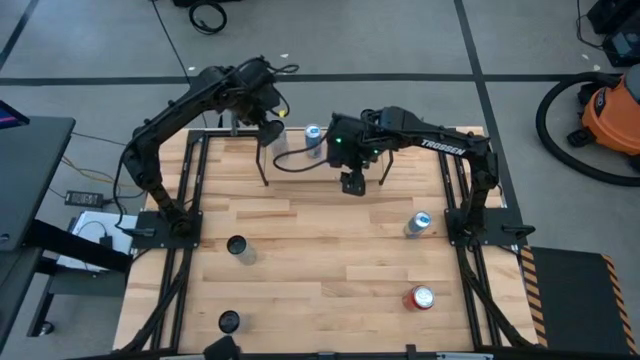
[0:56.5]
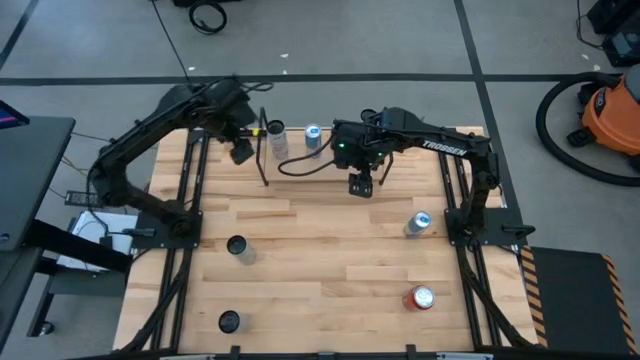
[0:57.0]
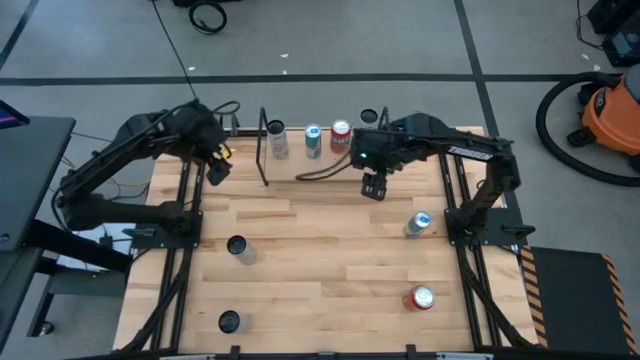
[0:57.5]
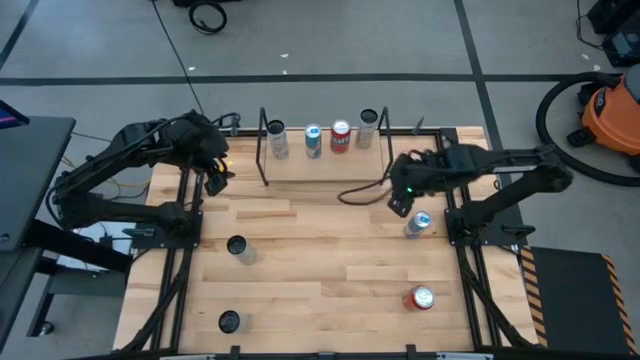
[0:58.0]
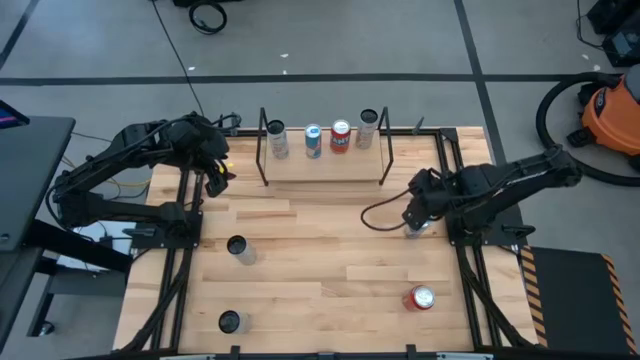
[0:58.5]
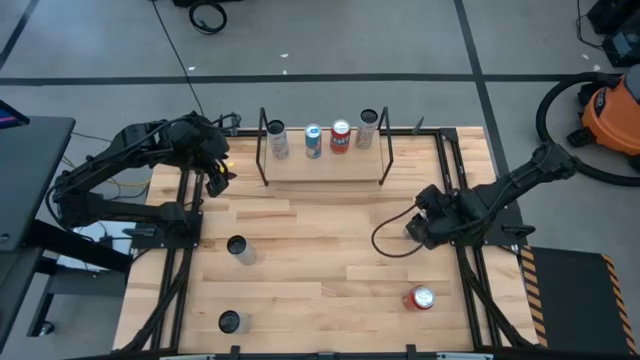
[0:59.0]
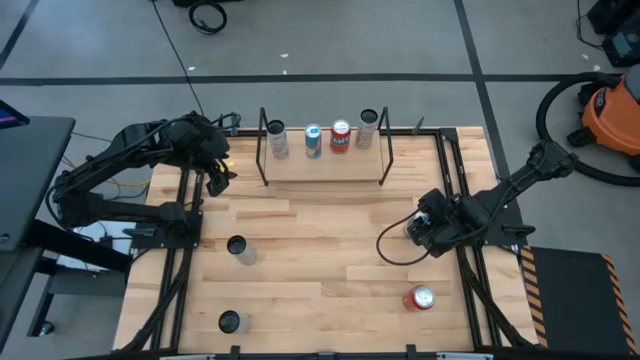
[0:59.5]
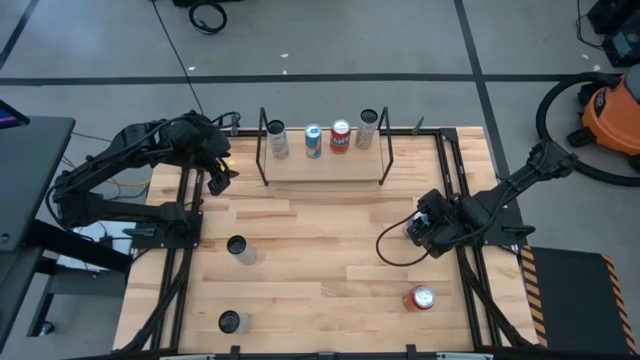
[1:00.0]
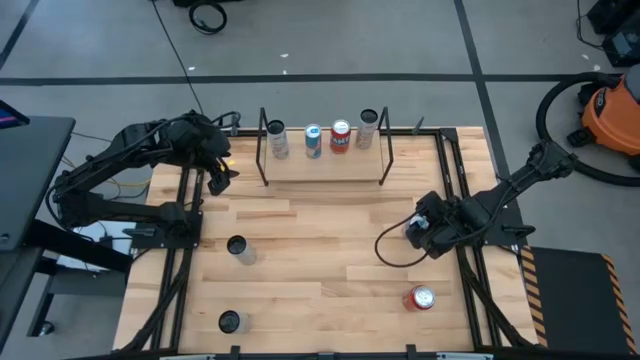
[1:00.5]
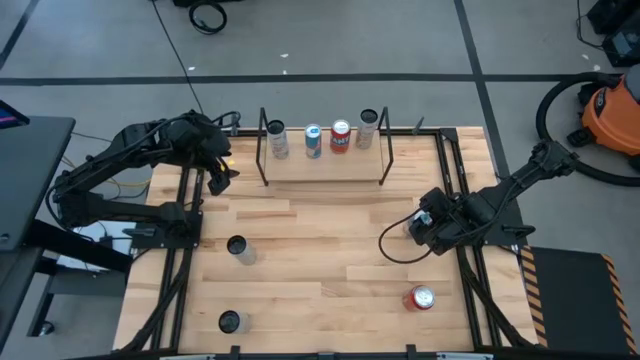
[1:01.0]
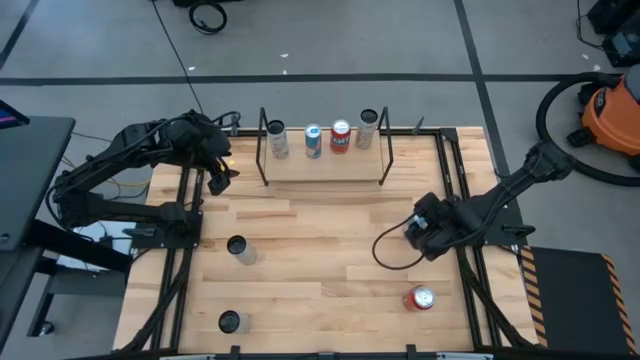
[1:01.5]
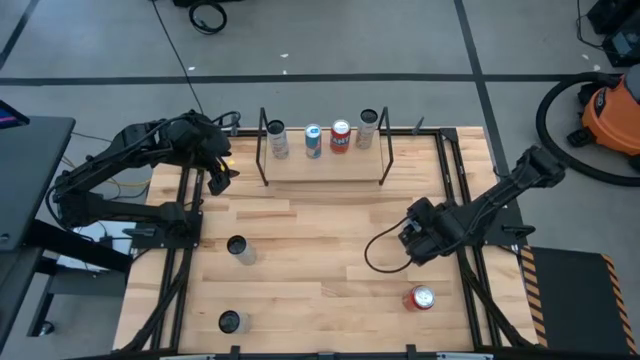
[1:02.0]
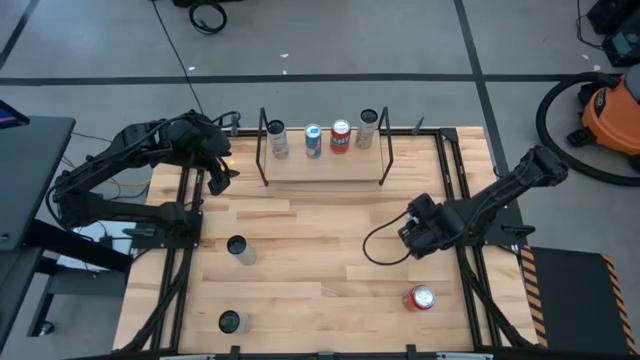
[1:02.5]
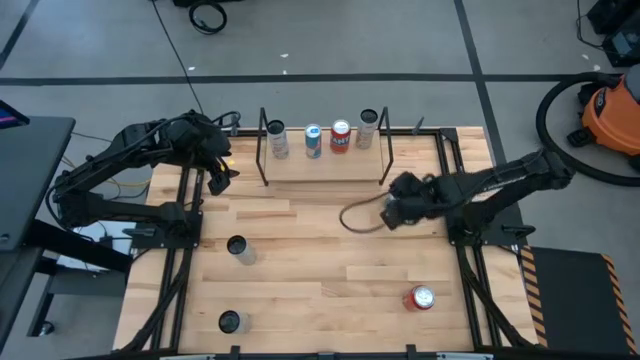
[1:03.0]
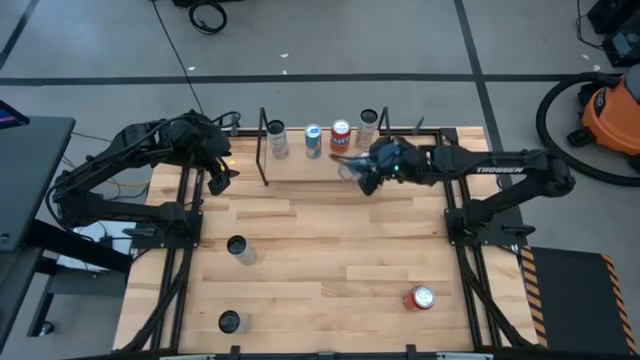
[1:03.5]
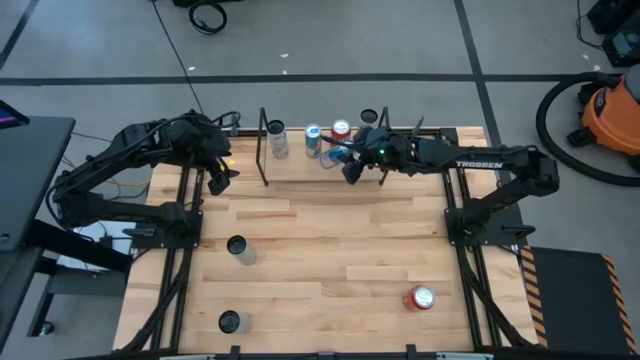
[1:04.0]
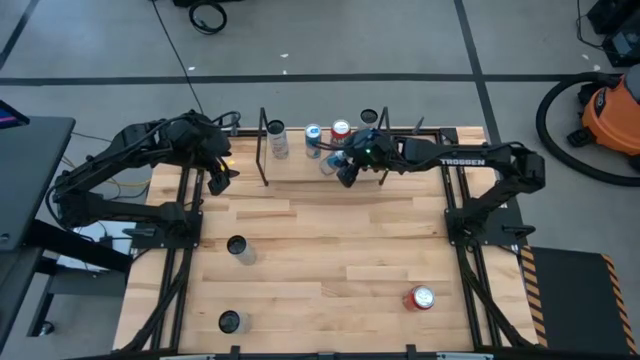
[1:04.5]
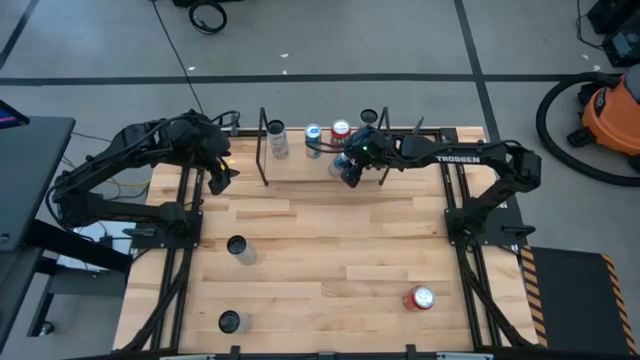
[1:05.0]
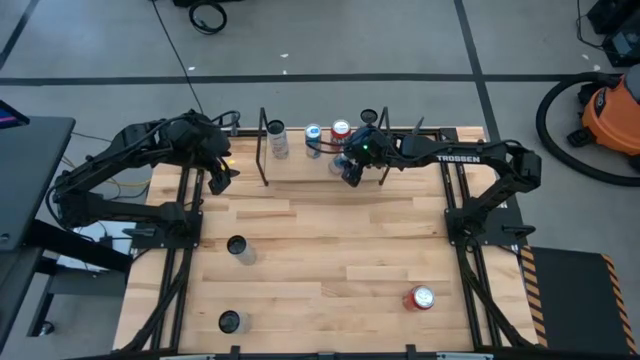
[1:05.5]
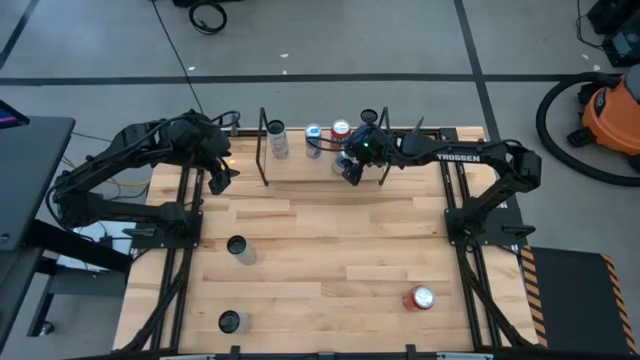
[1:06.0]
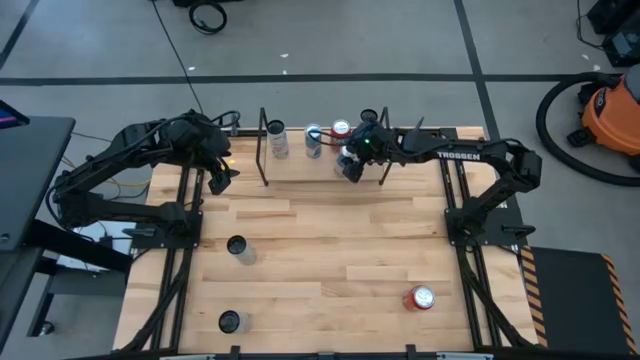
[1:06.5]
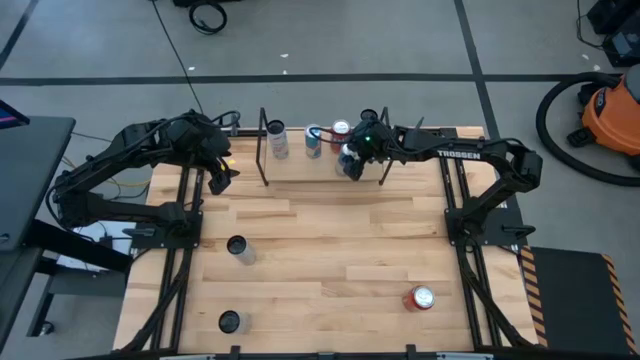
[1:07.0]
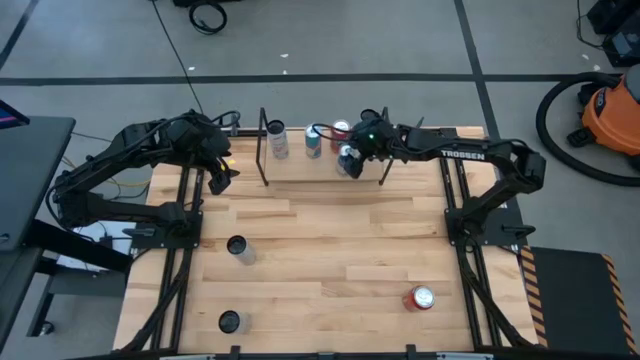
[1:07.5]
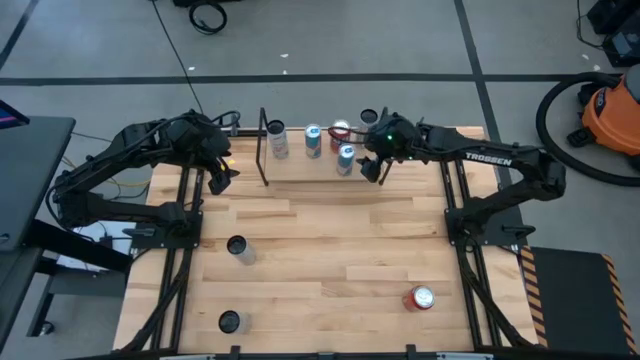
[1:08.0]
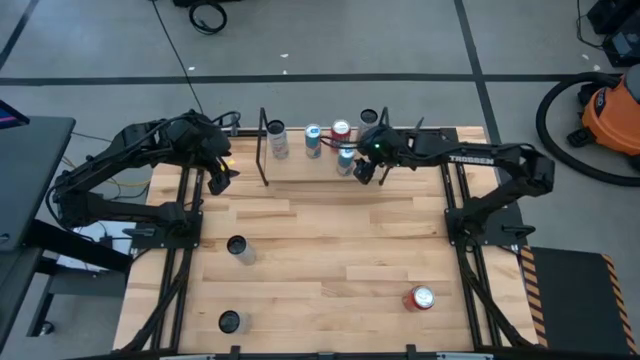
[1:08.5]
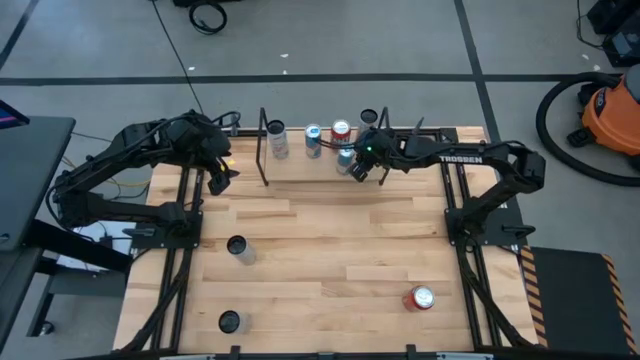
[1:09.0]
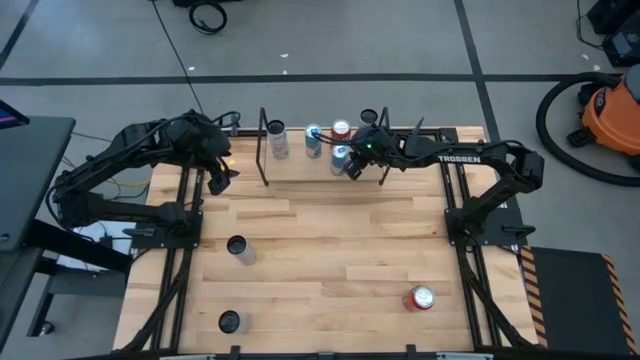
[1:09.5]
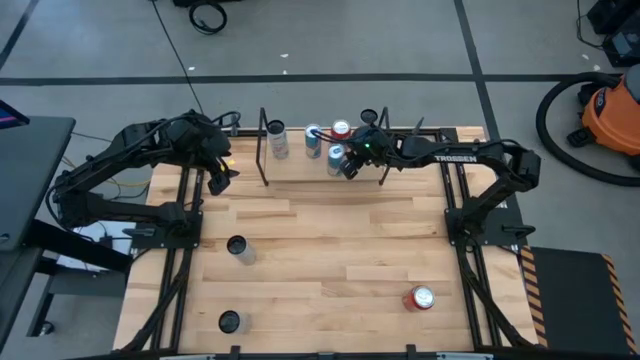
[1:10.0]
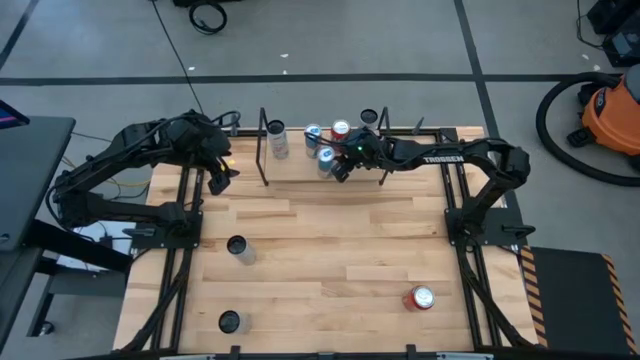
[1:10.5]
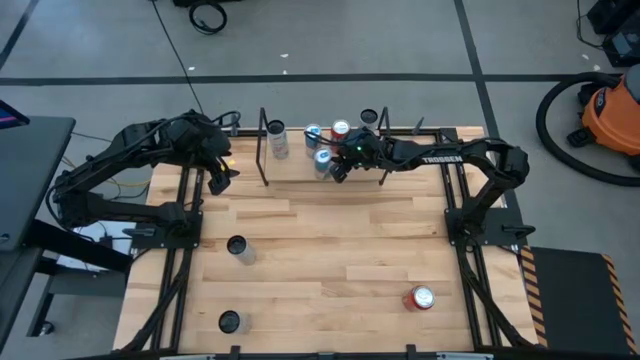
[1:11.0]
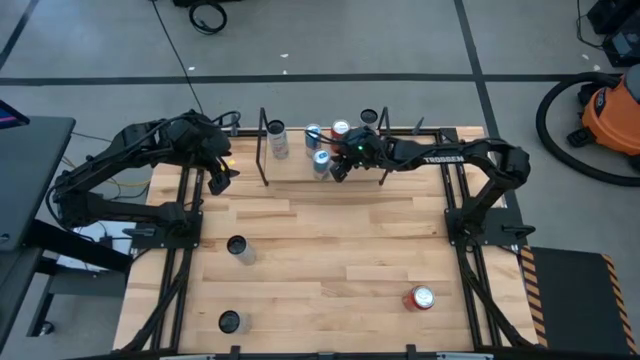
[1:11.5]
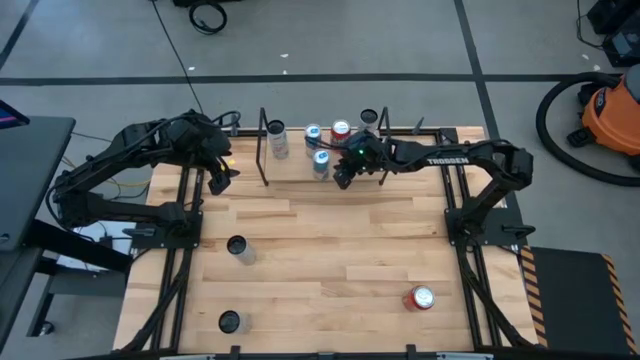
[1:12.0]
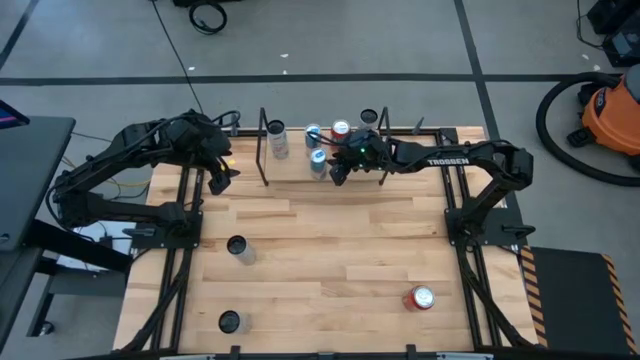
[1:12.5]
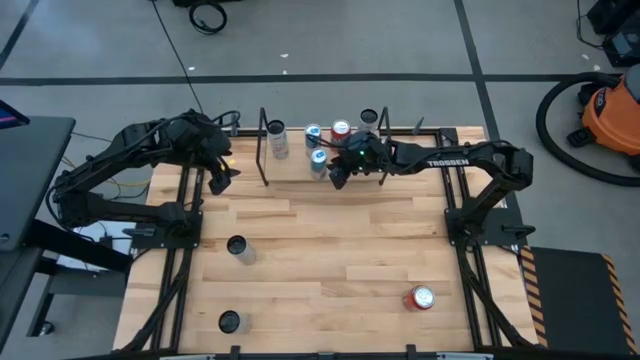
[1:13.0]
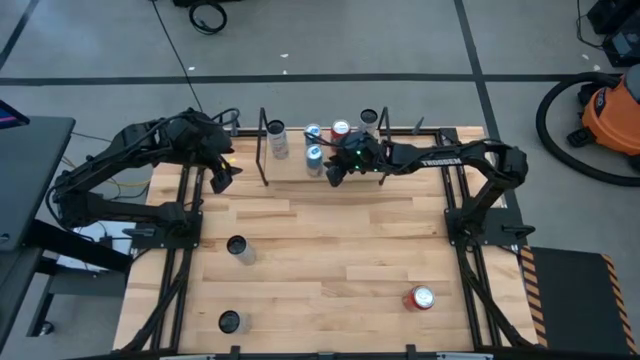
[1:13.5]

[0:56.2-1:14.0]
Task: Place canned beverage on shelf
Put the blue soda can on the shelf aligned with the other blue soda can

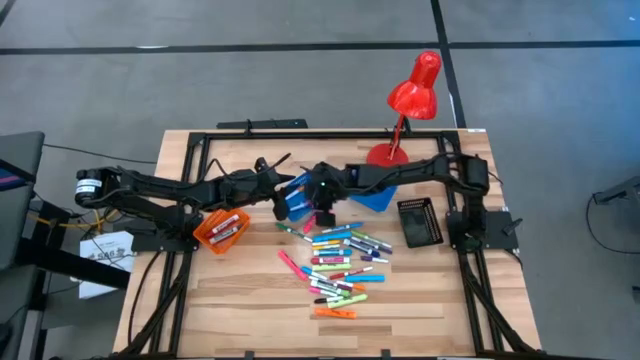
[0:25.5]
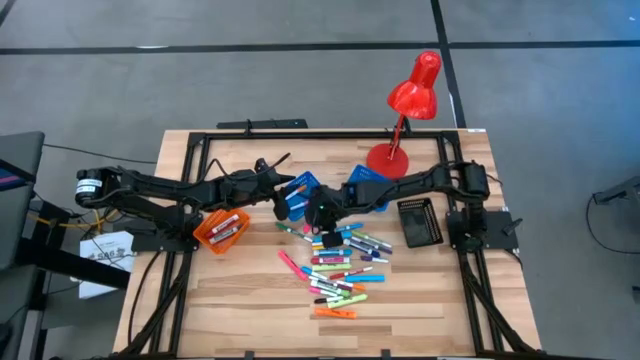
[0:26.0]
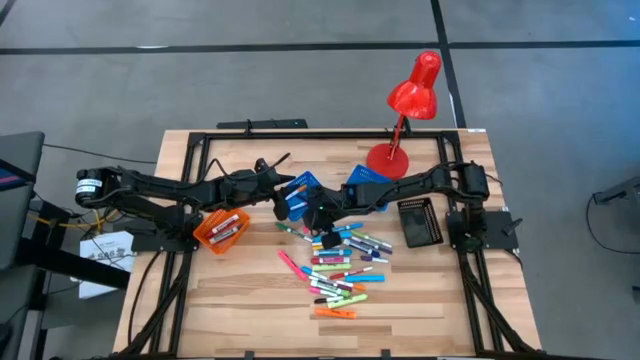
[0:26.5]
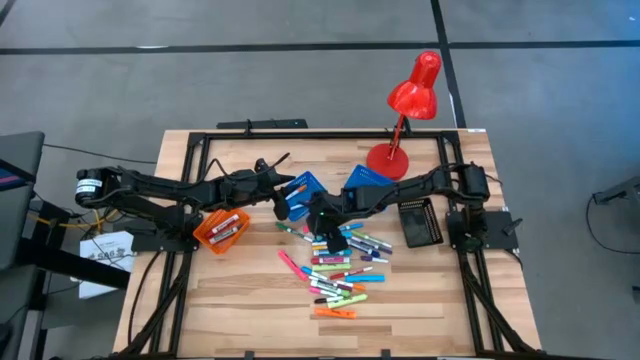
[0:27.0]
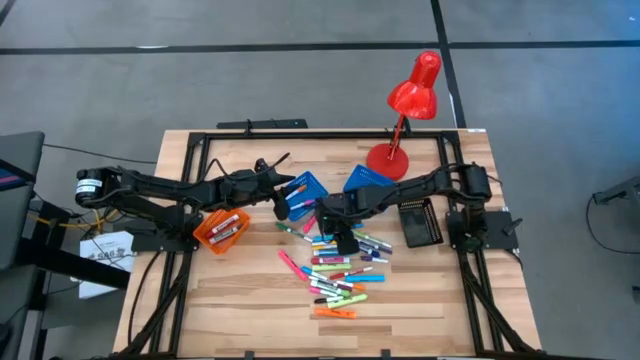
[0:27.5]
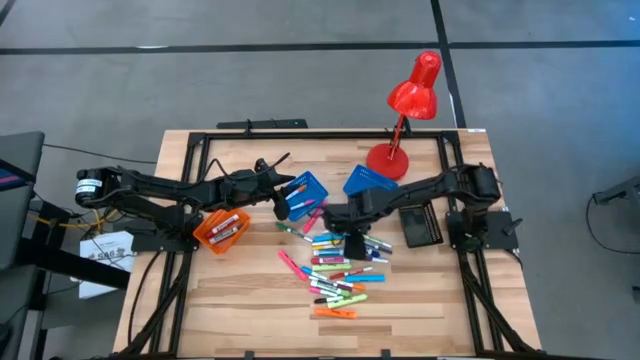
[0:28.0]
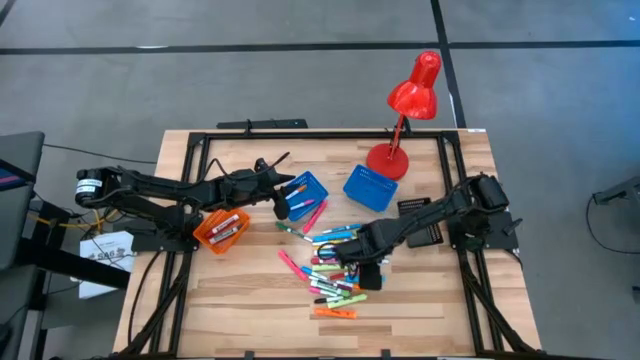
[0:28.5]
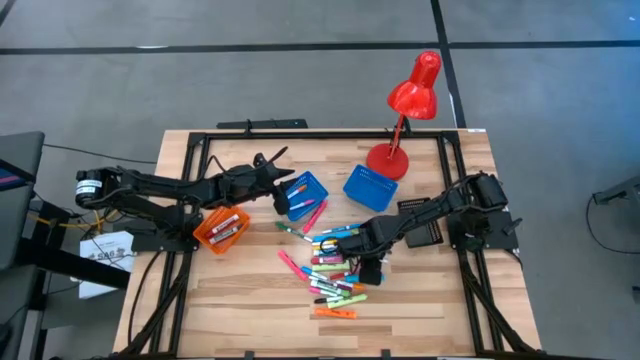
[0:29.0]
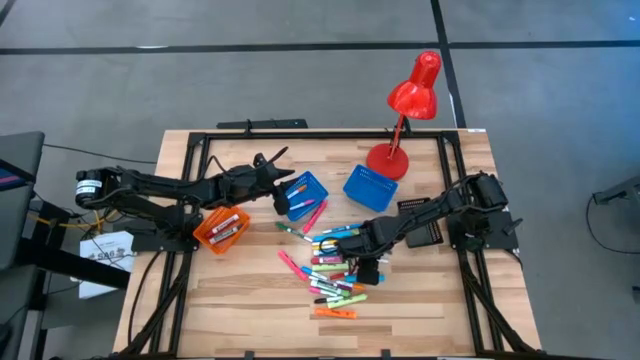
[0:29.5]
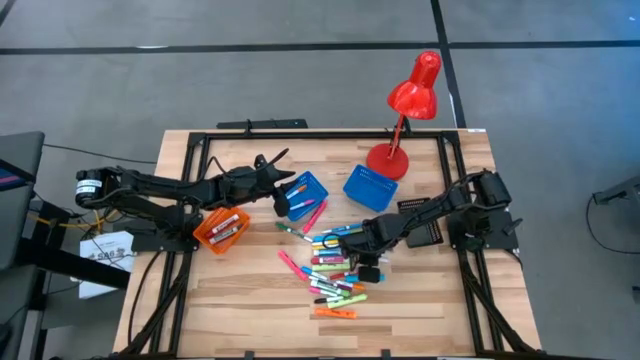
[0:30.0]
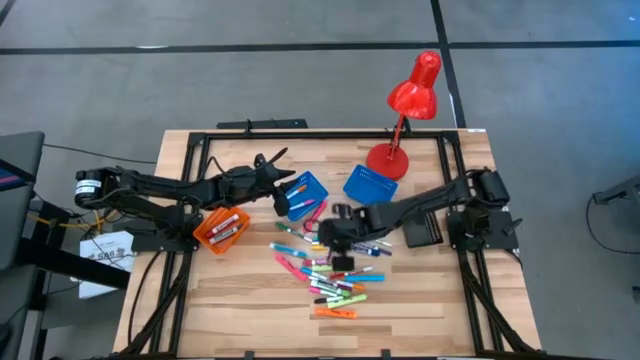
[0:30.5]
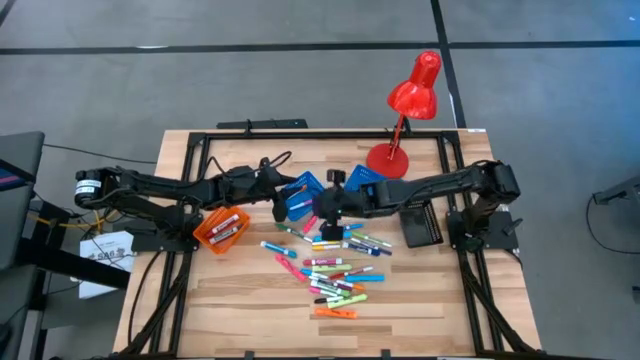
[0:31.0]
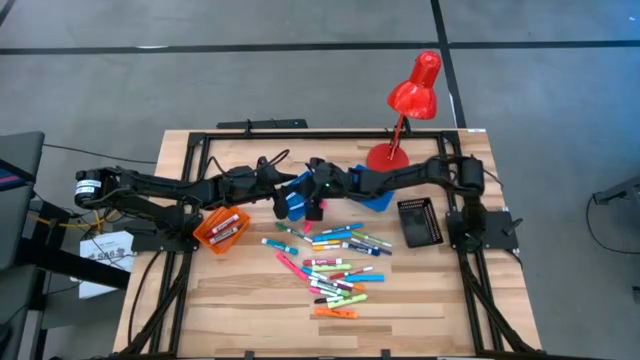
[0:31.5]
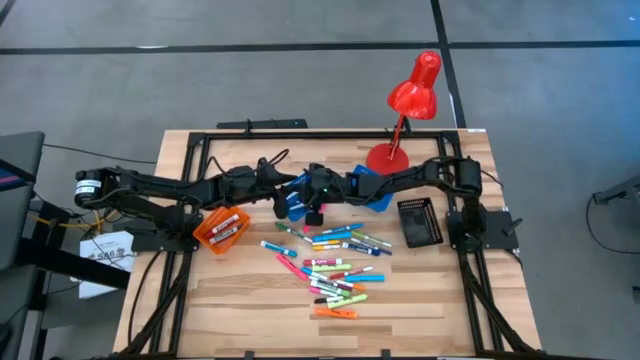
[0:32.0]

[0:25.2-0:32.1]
Task: Pick & Place Markers
Put the small violet highlighter pen into the left blue bin
